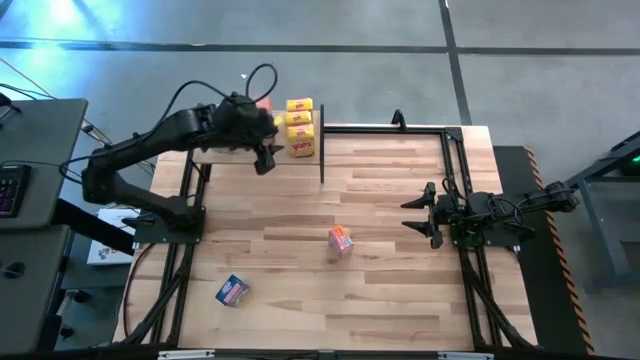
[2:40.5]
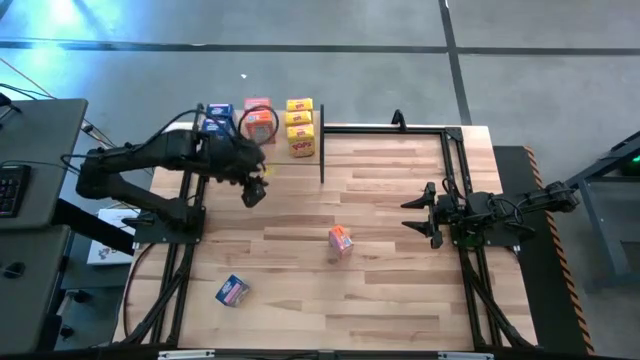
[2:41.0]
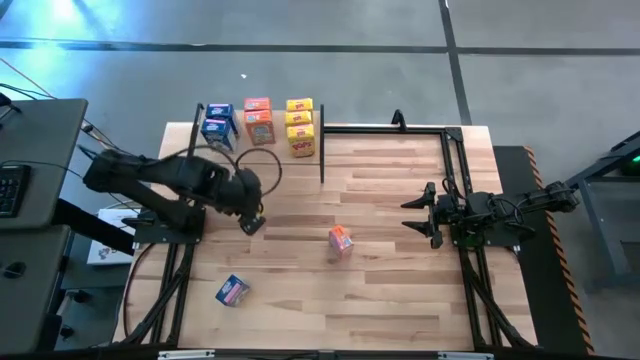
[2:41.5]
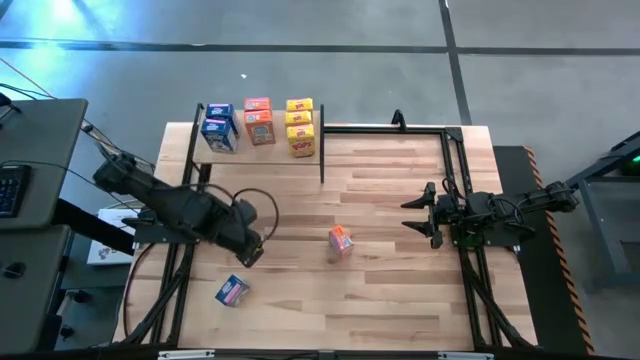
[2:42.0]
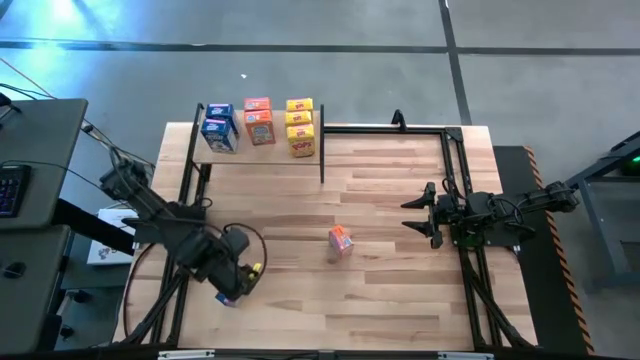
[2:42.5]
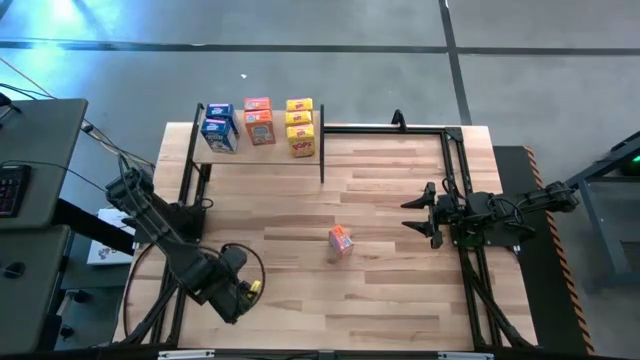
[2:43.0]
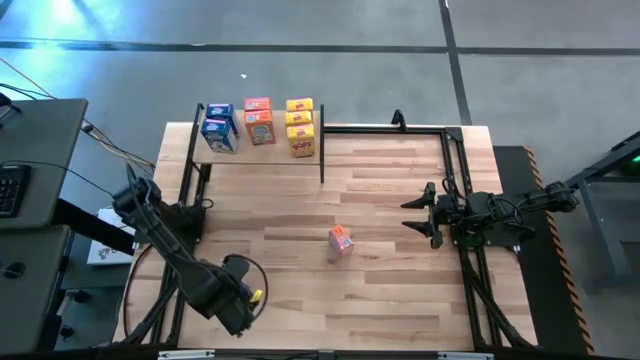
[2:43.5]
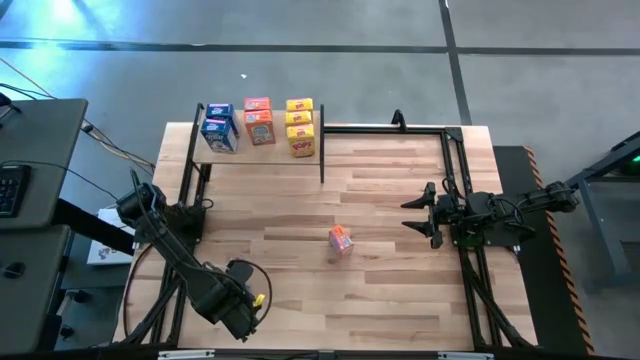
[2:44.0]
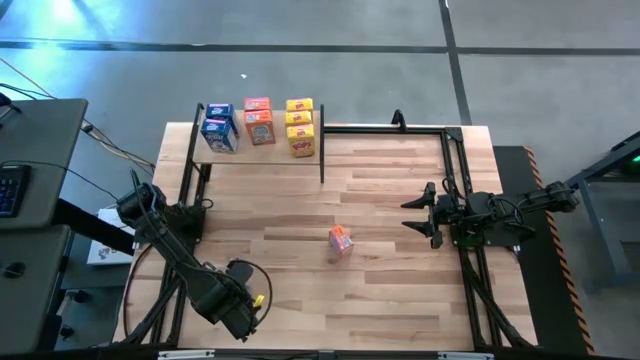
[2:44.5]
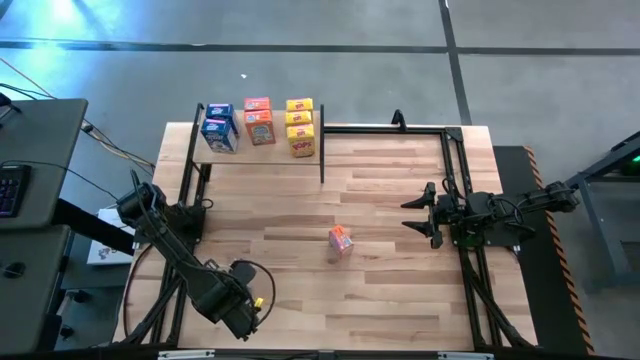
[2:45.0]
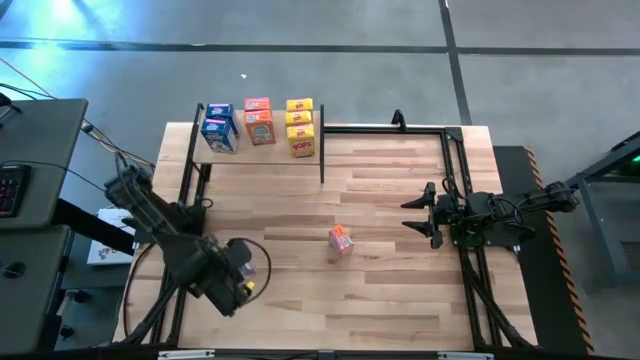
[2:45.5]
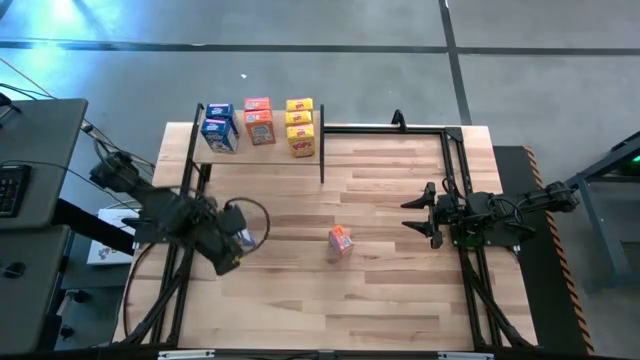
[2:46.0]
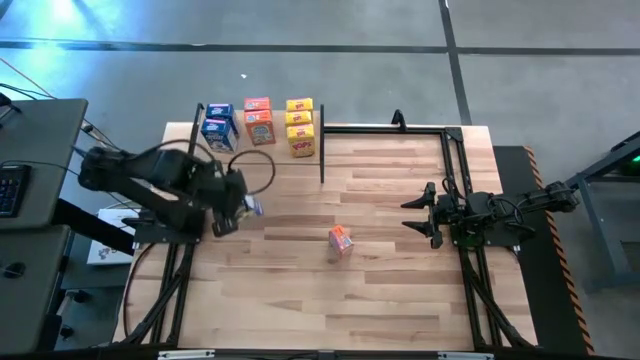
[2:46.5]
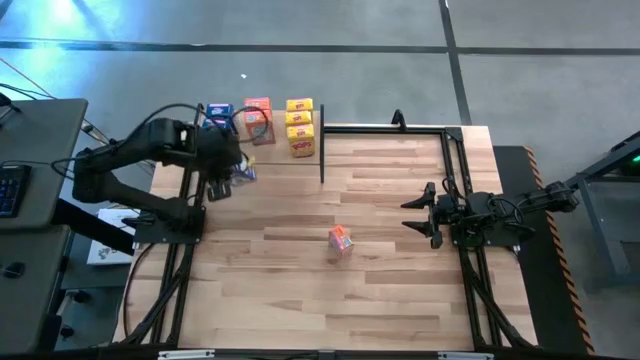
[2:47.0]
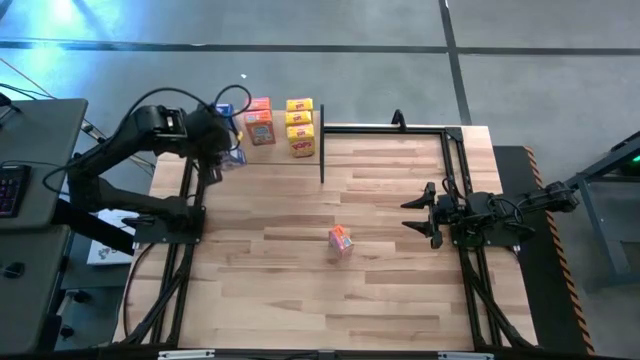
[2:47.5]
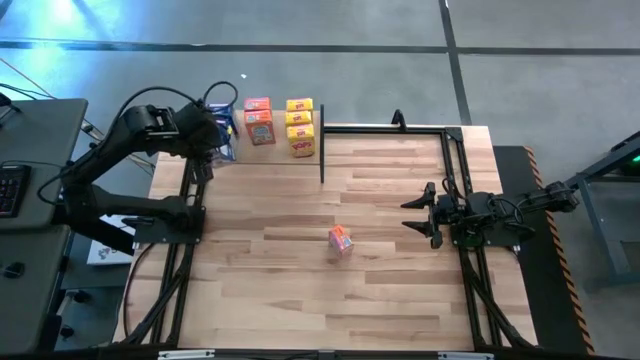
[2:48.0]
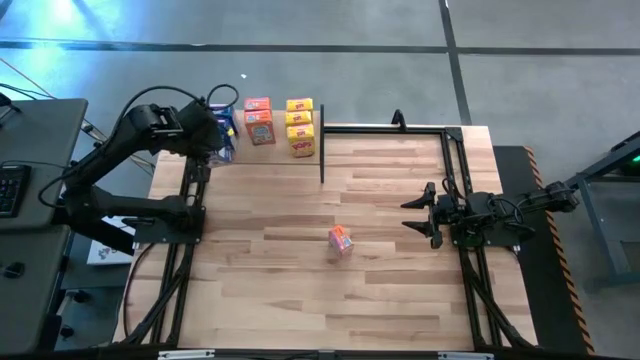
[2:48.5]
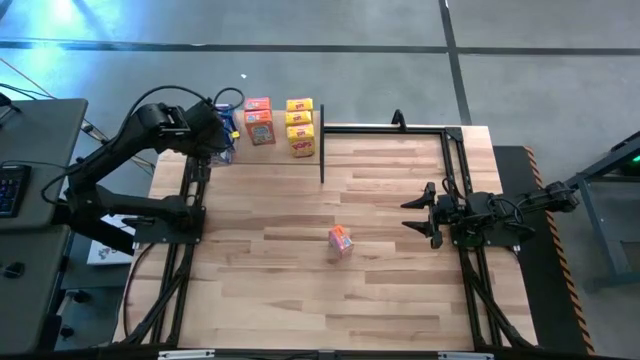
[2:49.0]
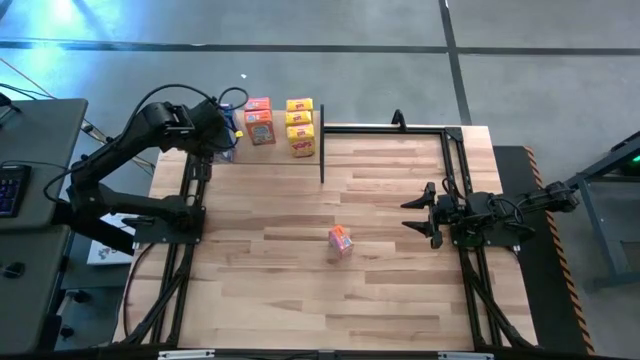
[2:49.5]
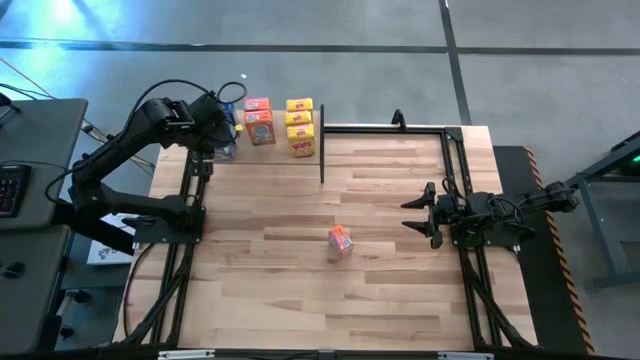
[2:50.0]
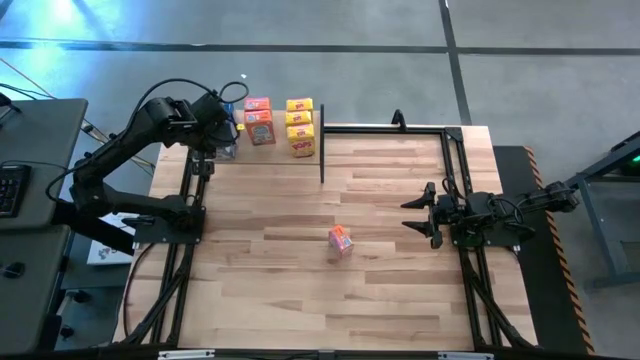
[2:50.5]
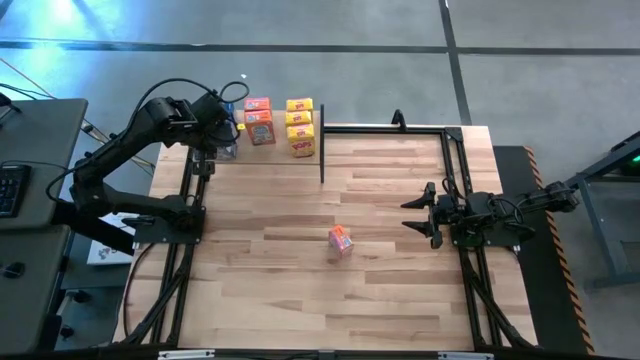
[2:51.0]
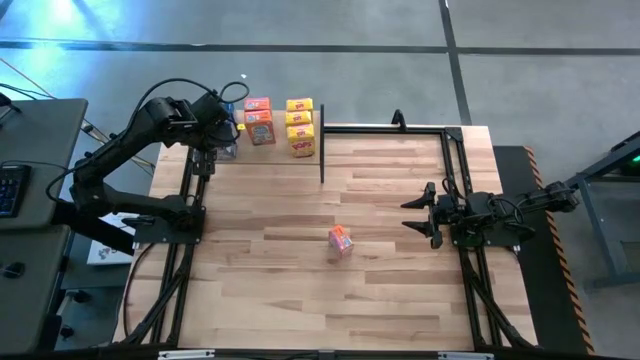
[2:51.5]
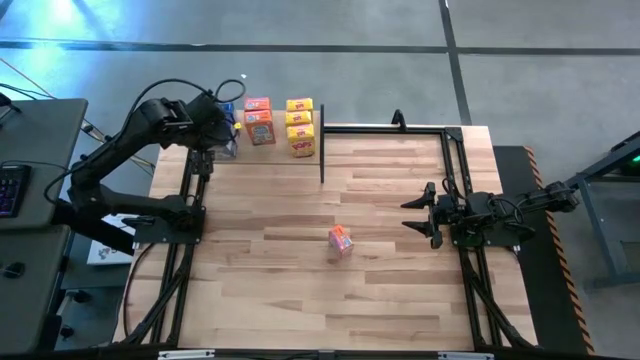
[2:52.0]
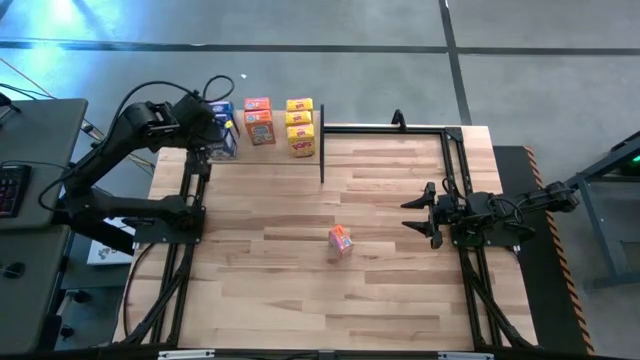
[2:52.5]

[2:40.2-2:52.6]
Task: Stack cereal on shelf
Put the blue cereal box on the shelf aligned with the other blue cereal boxes

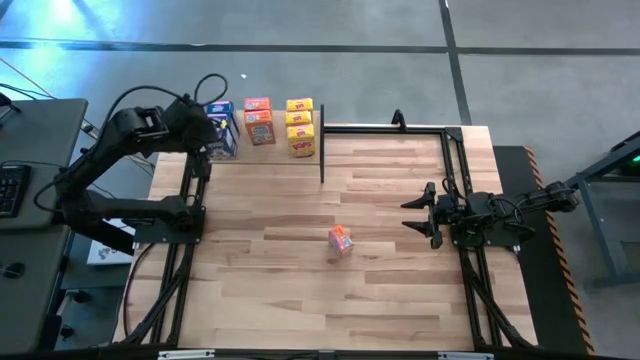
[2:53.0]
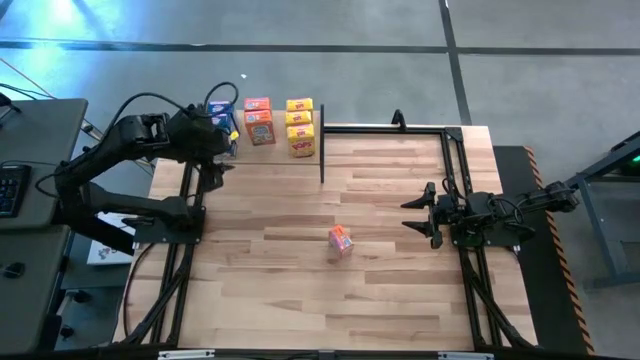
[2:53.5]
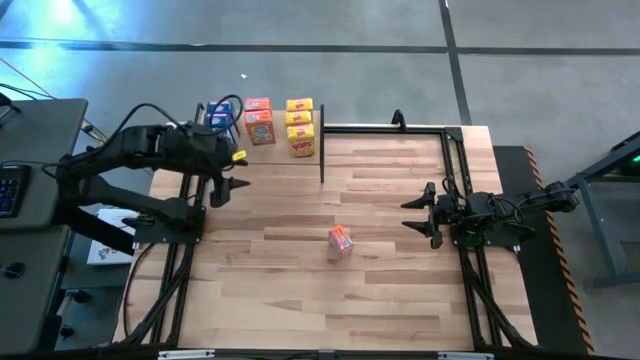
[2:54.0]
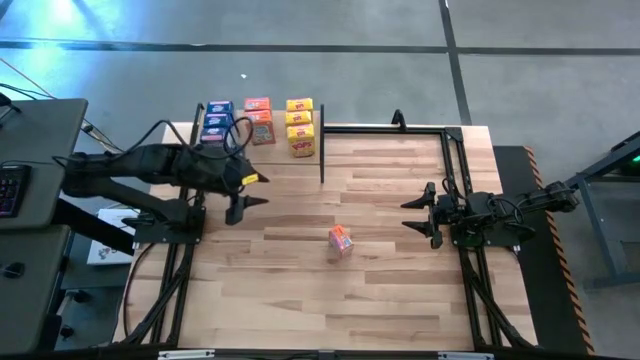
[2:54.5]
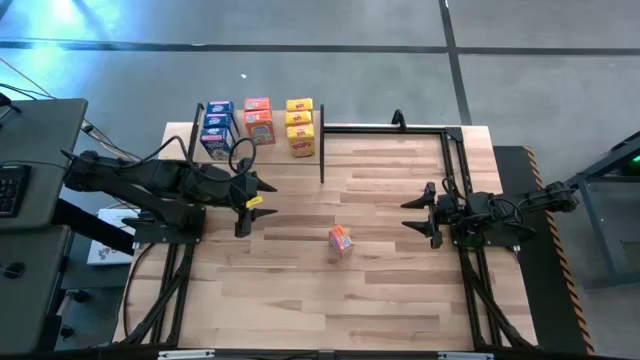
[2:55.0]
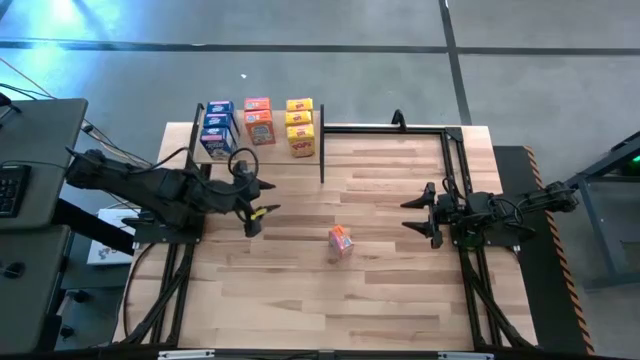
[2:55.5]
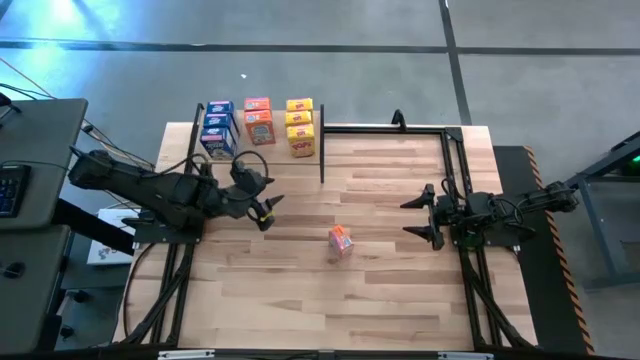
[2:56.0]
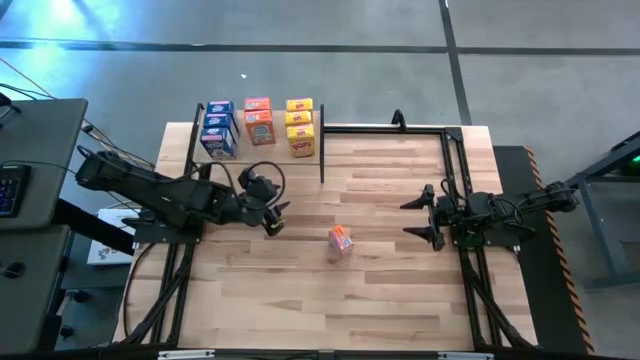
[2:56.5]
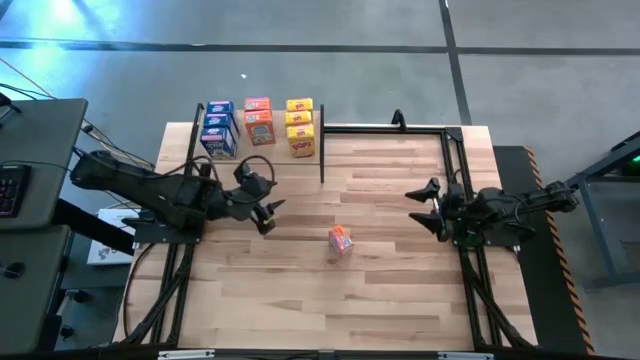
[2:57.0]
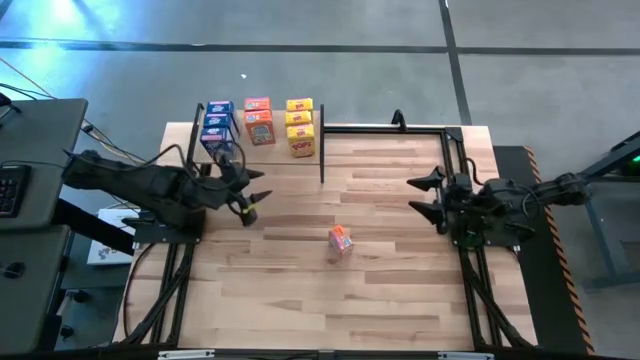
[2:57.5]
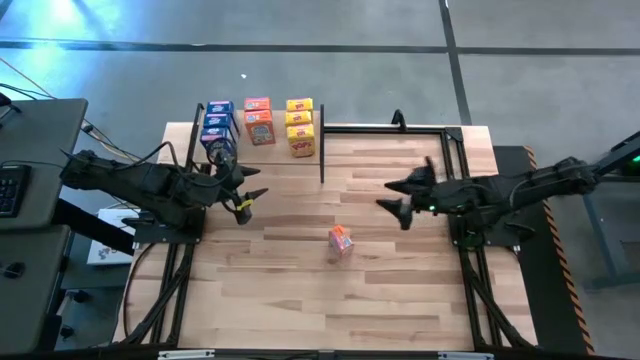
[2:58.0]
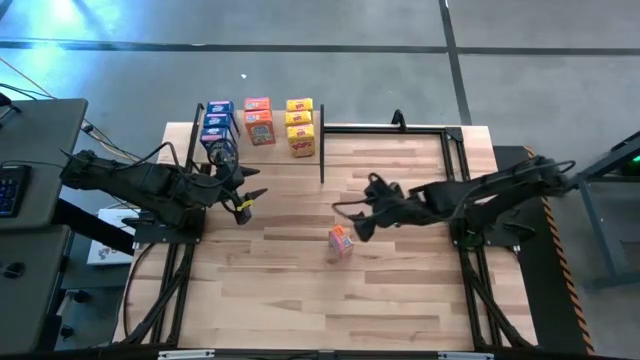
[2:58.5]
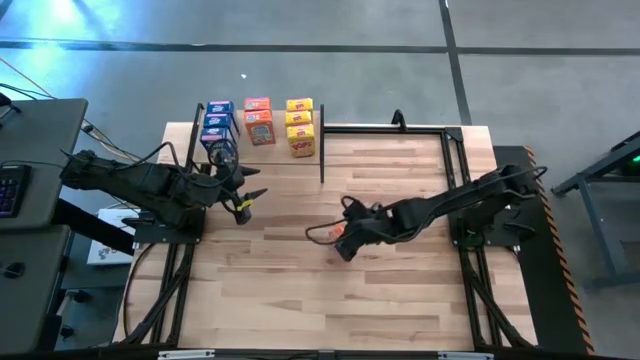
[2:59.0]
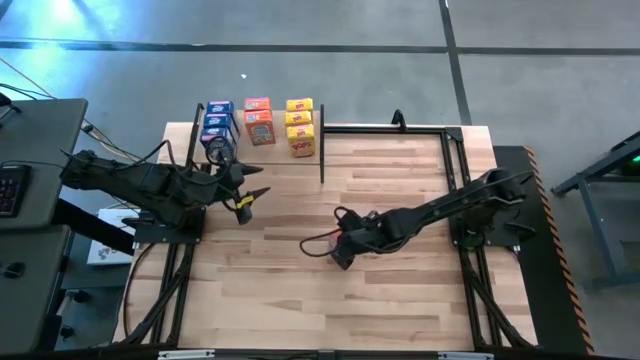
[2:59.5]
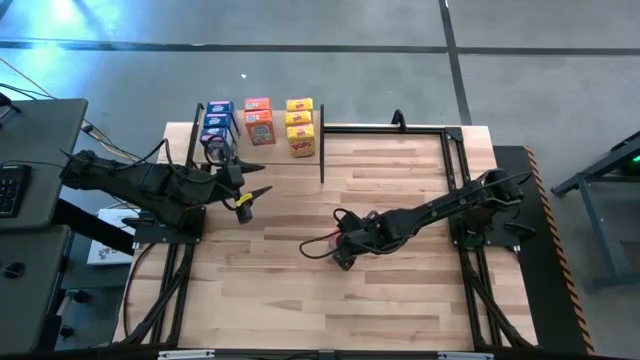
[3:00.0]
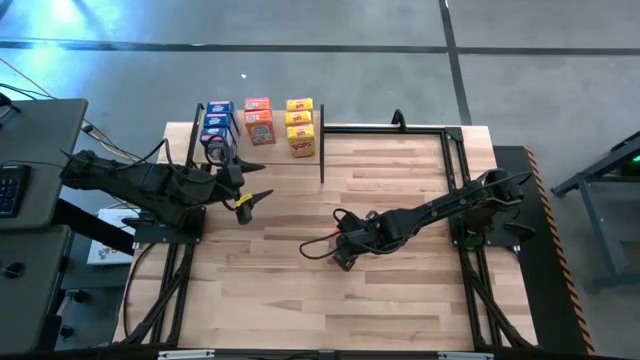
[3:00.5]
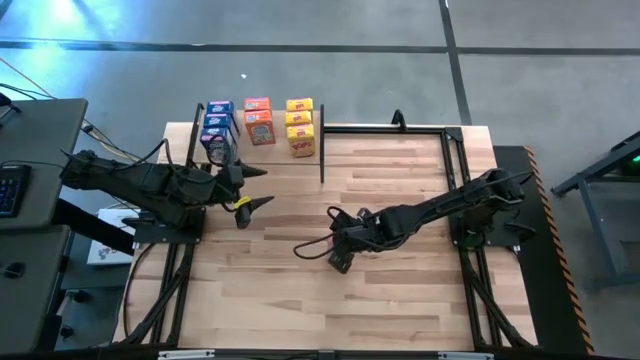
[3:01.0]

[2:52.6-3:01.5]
Put the orange cereal box on the shelf aligned with the other orange cereal boxes

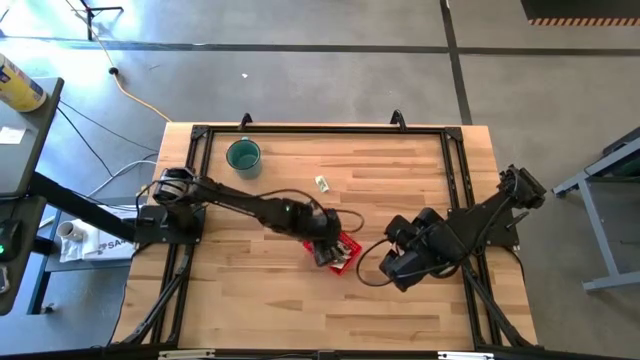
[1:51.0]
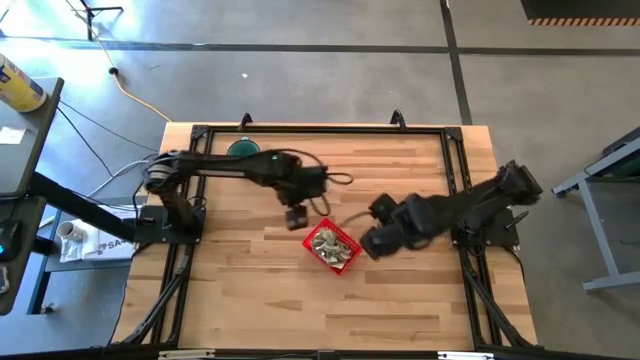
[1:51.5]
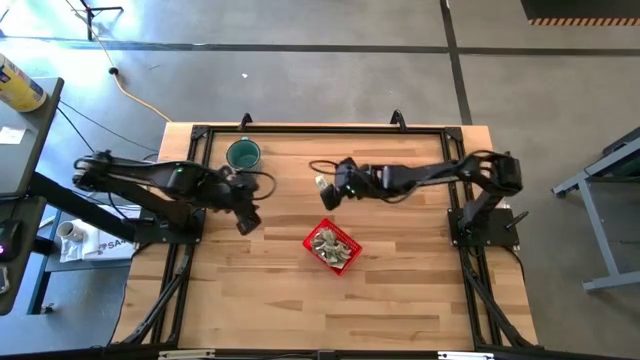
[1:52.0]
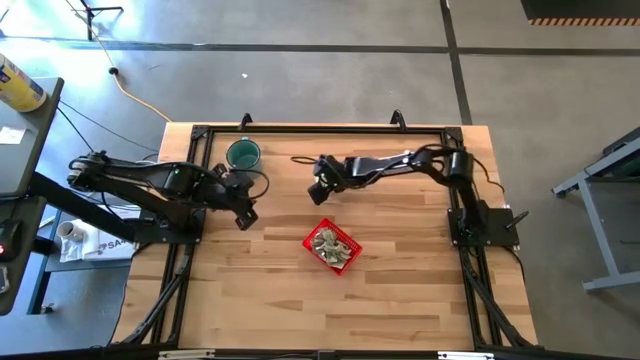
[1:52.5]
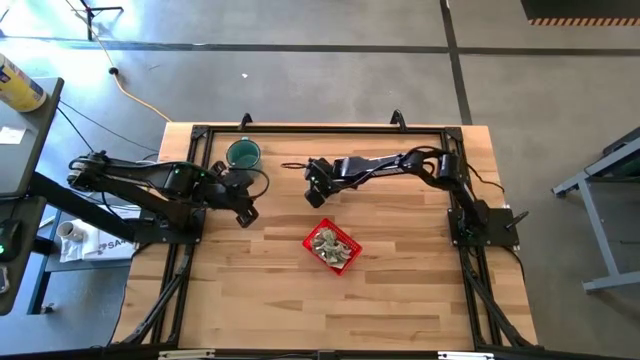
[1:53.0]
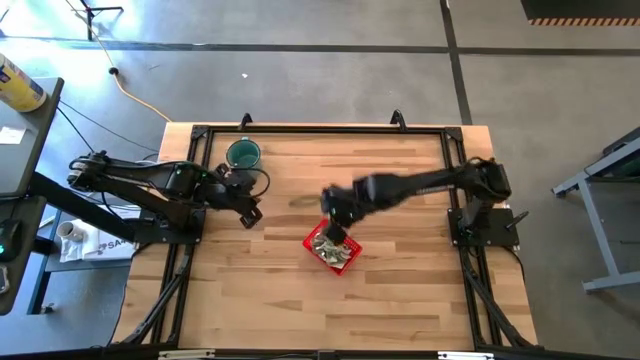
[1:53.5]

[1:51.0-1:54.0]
Task: Pick and place Stevia / Truvia into bins
Put the light green stevia packet into the bin
